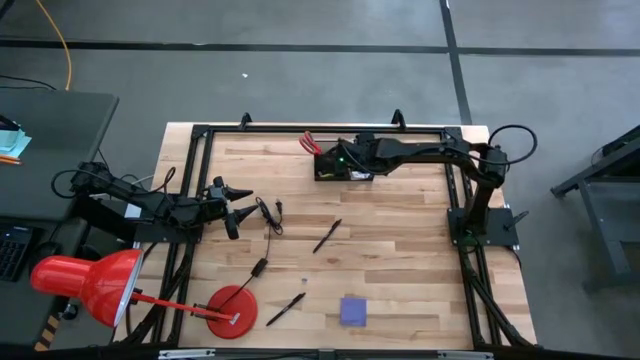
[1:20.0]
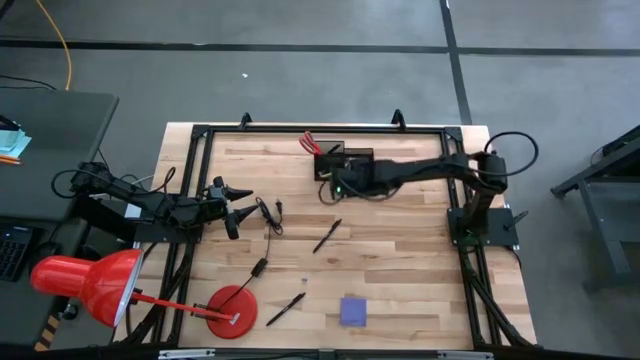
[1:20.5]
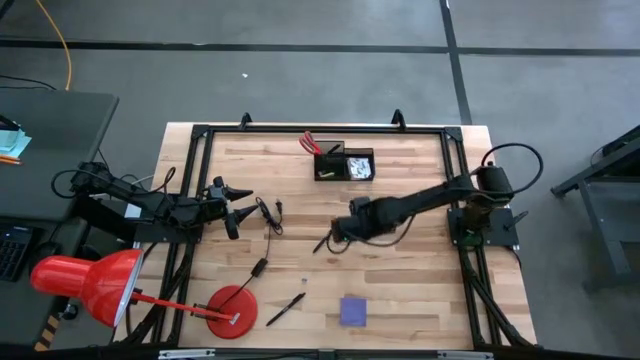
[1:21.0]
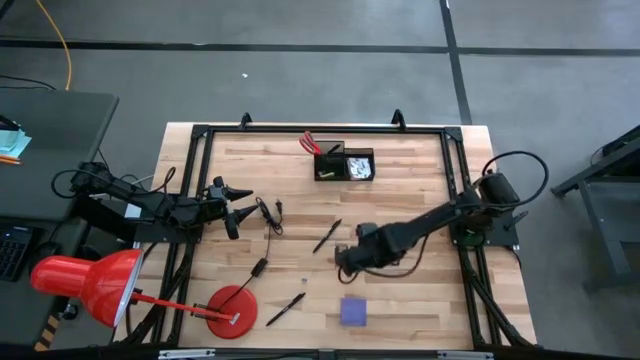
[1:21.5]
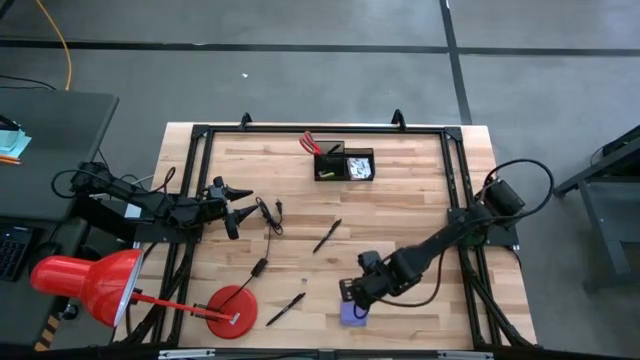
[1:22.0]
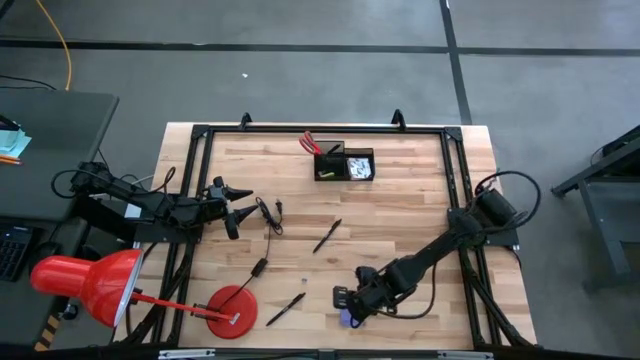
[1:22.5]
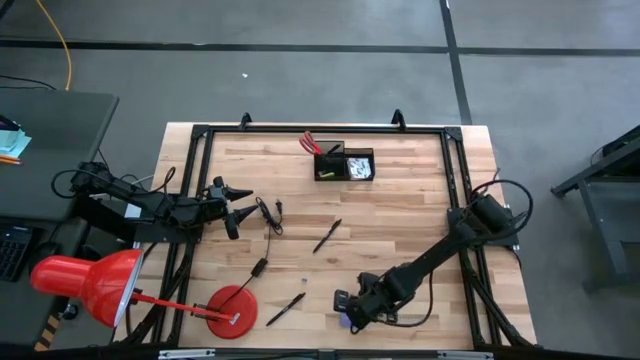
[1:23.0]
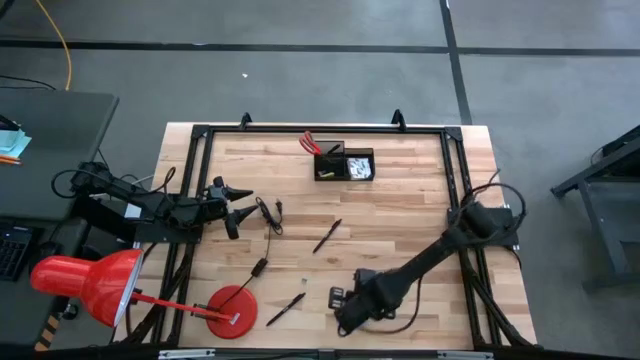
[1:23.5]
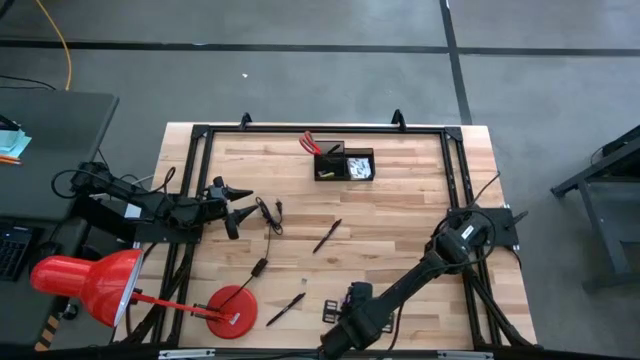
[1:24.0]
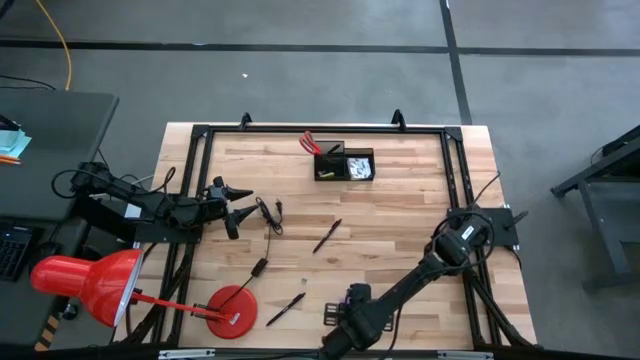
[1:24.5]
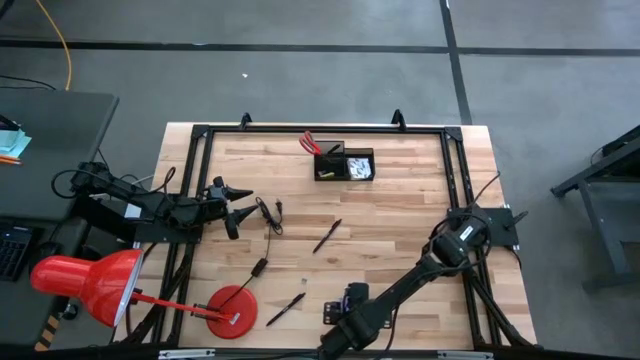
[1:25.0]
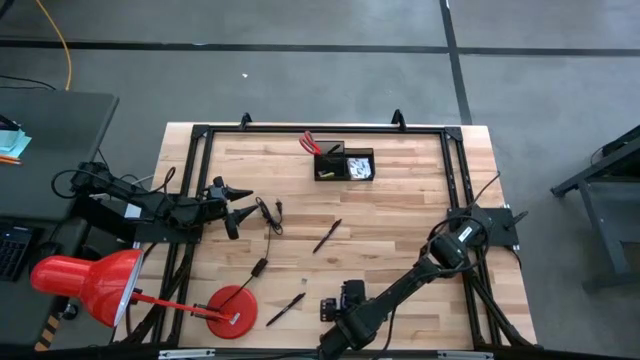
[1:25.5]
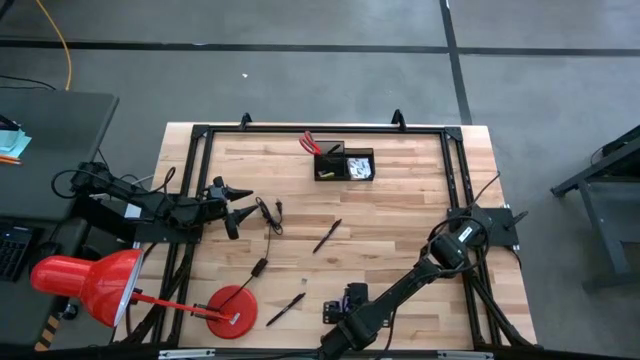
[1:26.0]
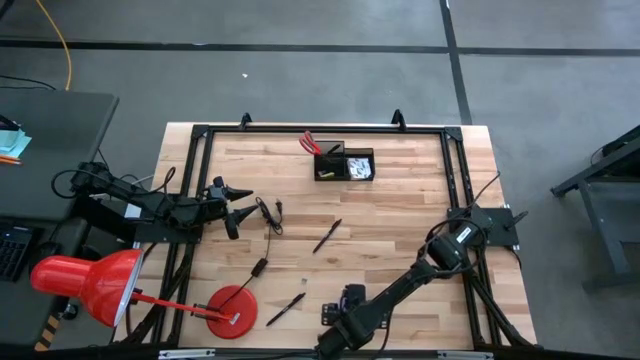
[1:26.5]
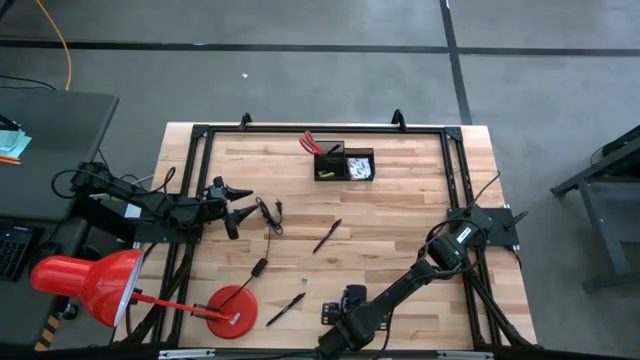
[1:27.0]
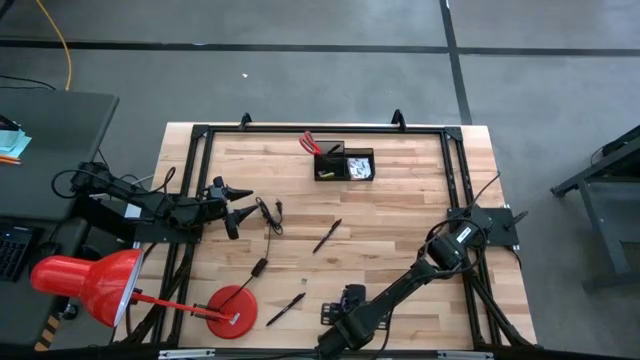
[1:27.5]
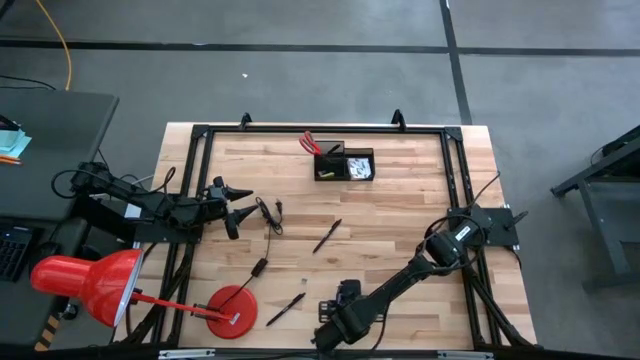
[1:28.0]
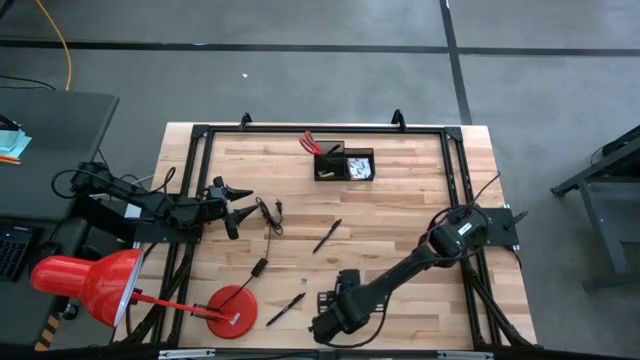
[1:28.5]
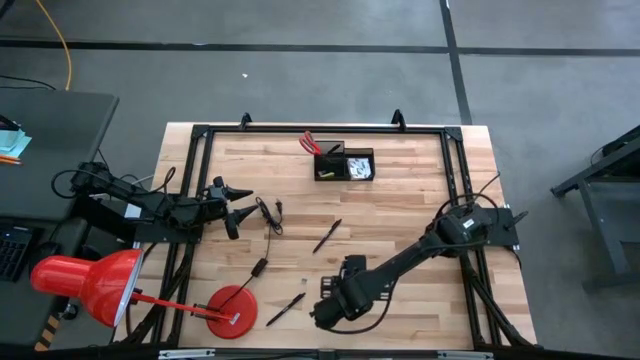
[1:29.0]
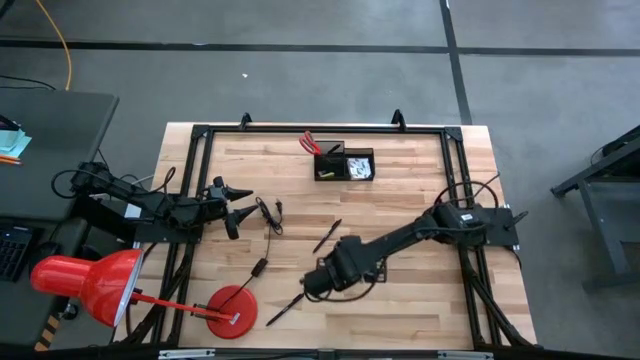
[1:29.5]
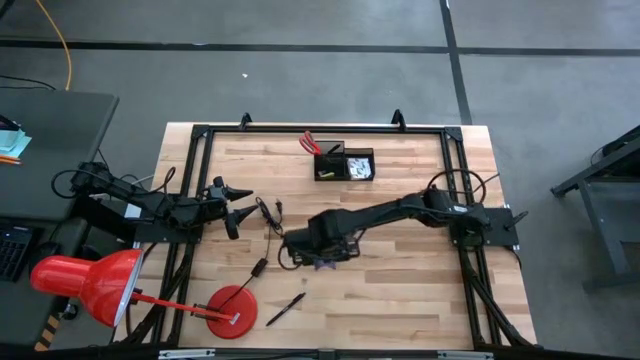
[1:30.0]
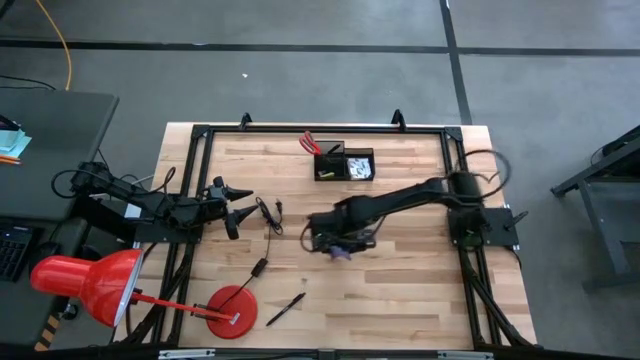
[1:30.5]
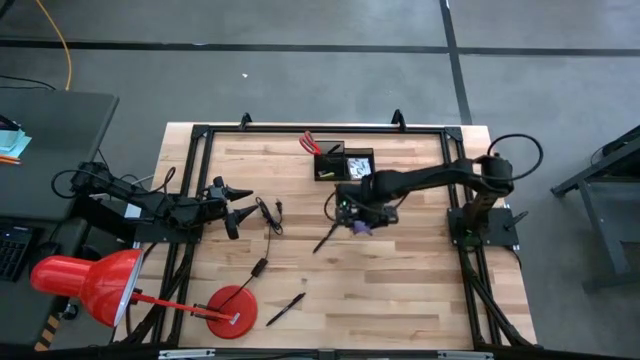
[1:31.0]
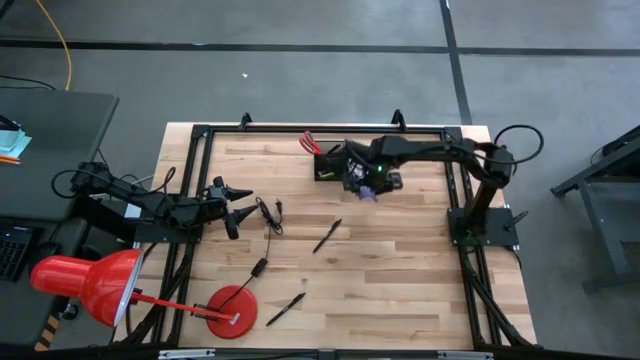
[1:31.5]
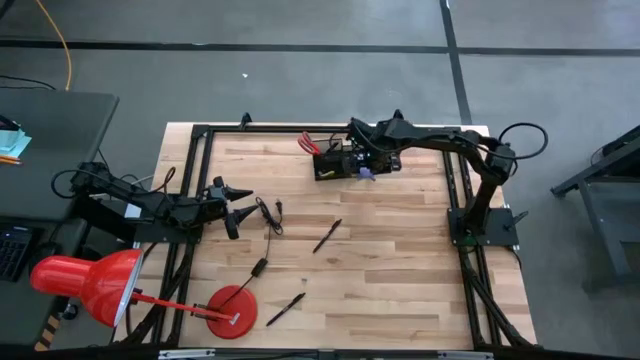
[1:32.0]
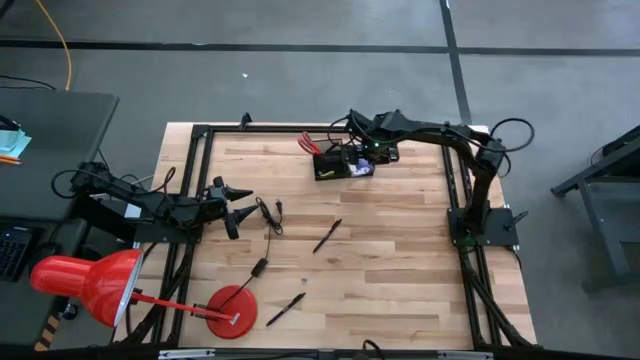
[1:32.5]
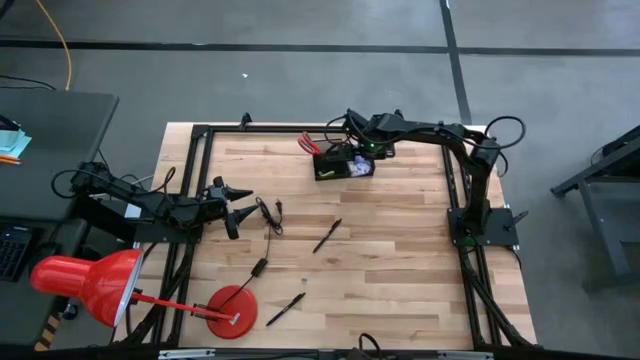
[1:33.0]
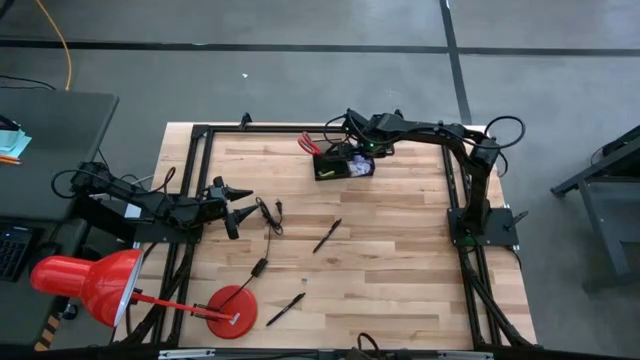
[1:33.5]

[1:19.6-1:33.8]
Task: Pick and place office supplies into organizer
Put the purple sticky note pad into the mesh desk organizer

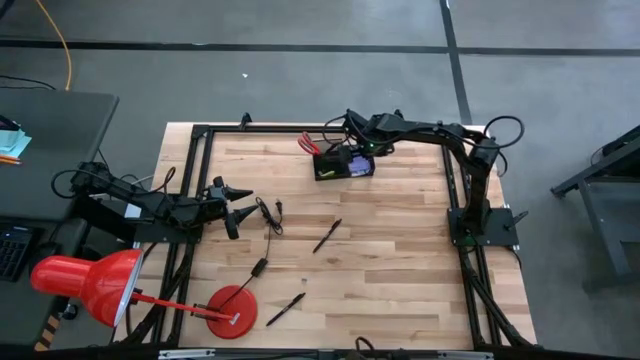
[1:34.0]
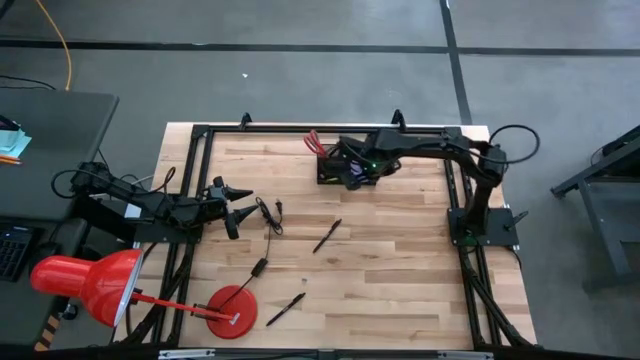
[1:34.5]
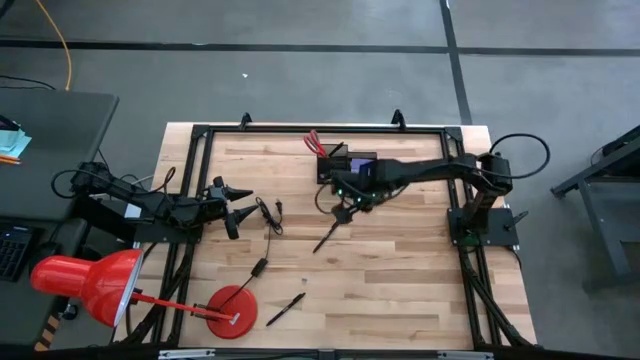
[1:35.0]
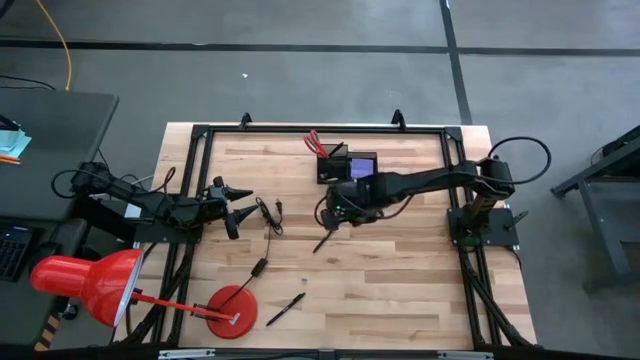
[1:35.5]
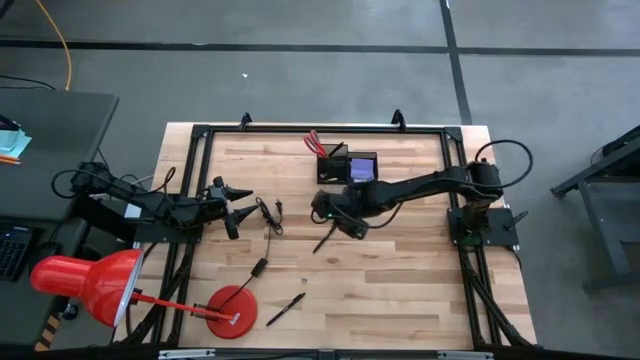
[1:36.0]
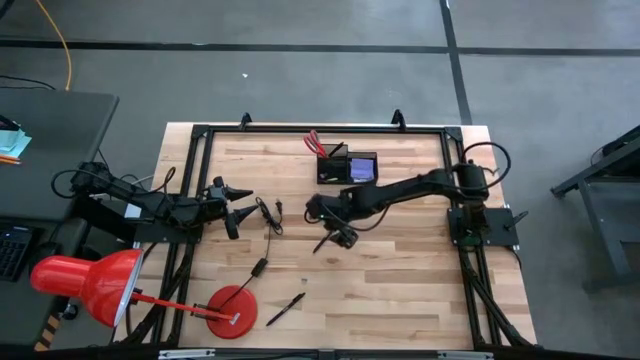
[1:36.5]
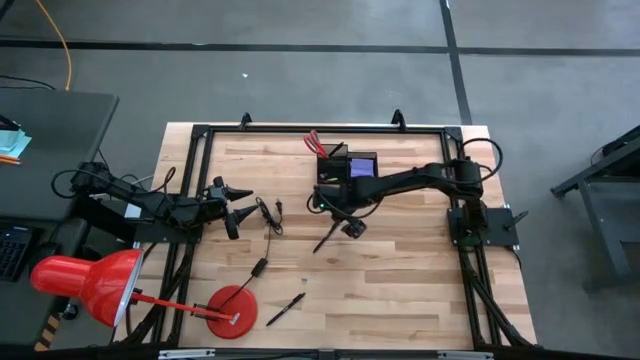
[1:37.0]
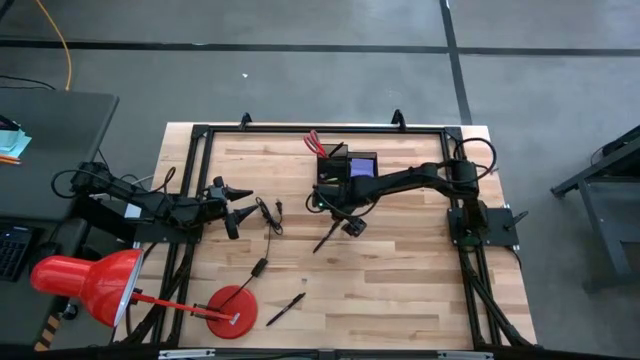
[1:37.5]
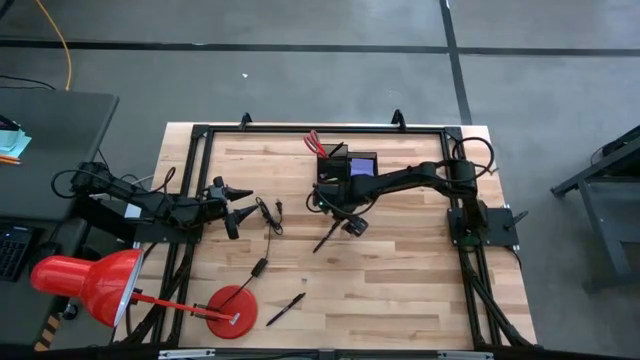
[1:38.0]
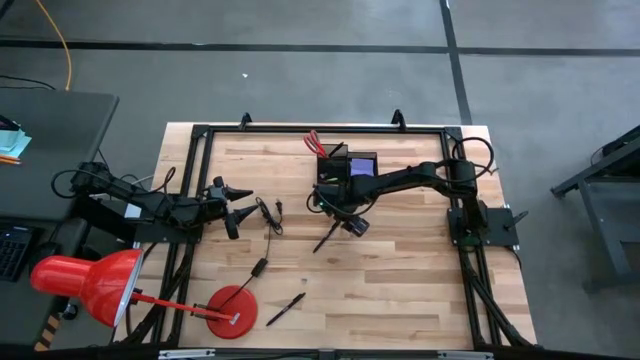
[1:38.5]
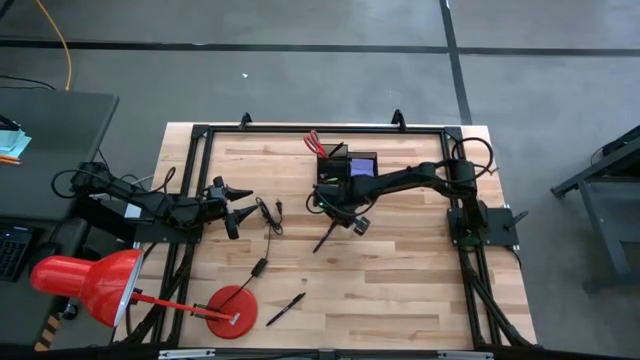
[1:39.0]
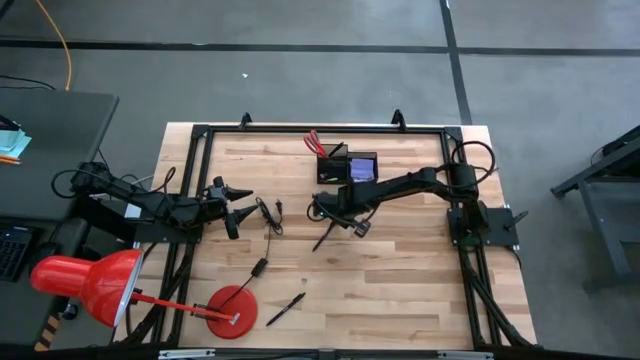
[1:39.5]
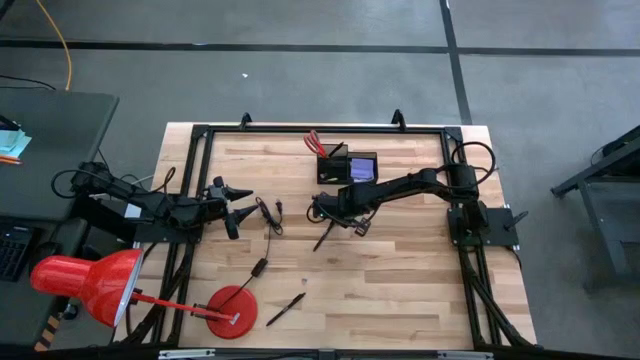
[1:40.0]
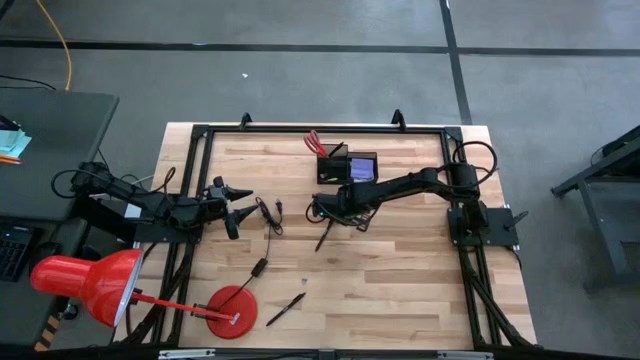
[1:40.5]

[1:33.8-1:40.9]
Put the top black pen into the mesh desk organizer
